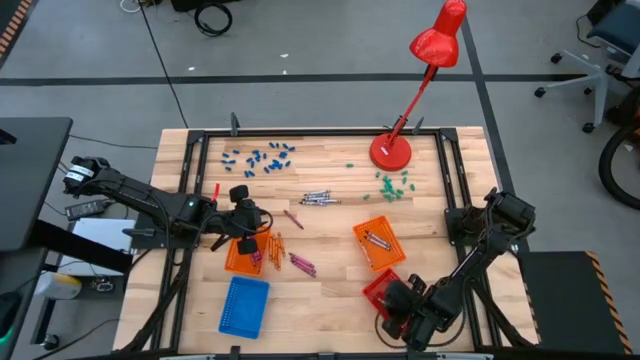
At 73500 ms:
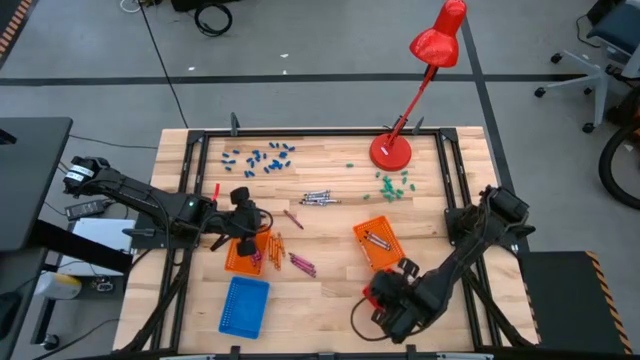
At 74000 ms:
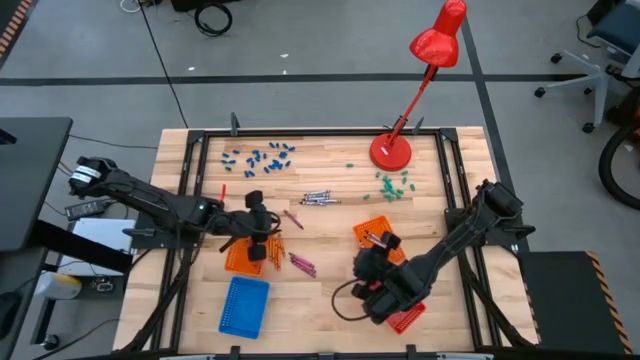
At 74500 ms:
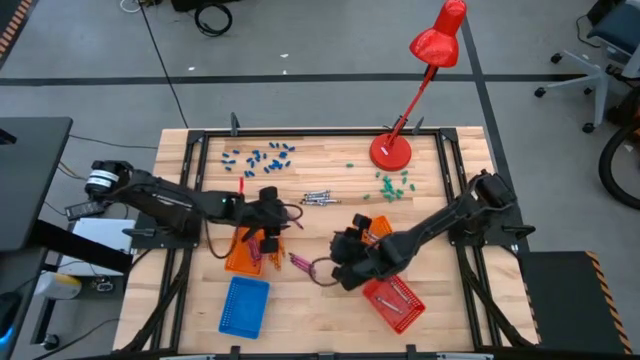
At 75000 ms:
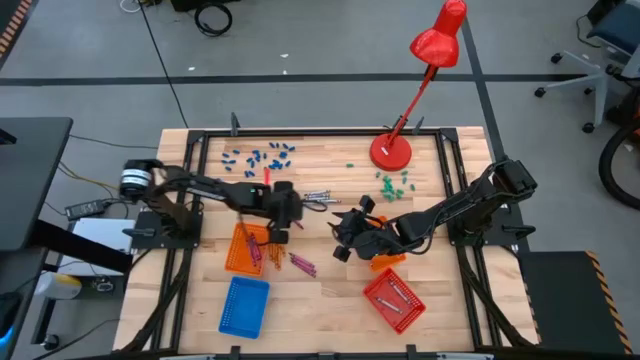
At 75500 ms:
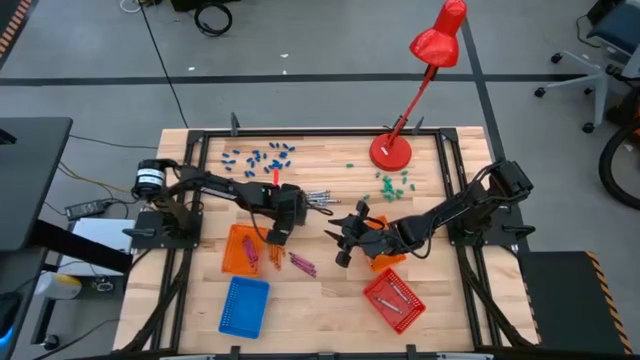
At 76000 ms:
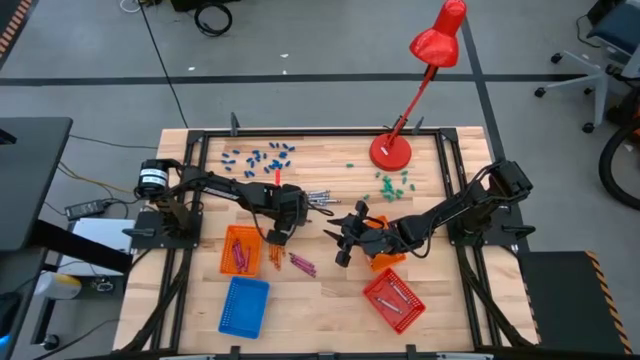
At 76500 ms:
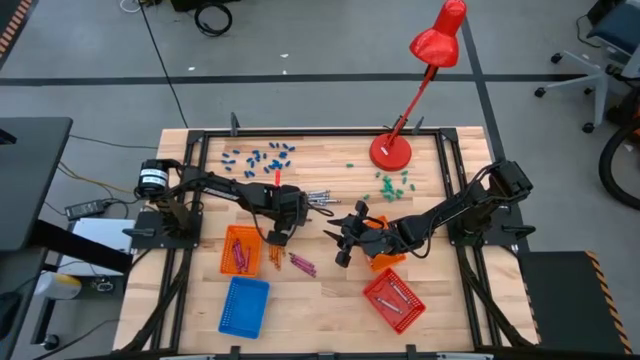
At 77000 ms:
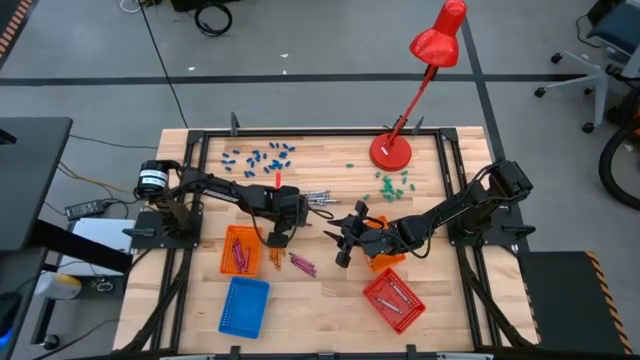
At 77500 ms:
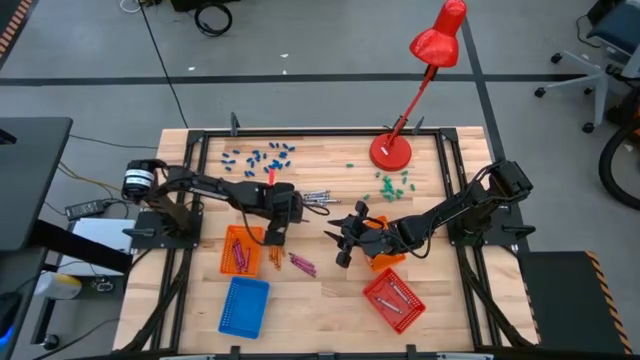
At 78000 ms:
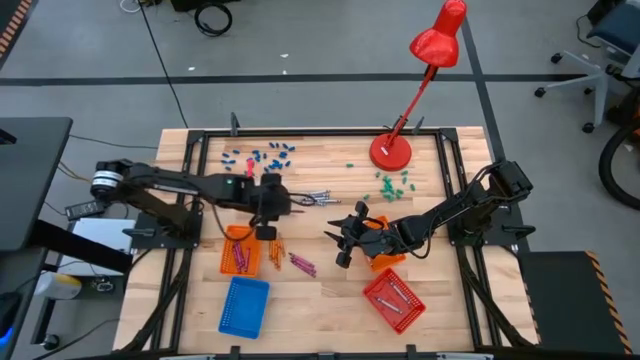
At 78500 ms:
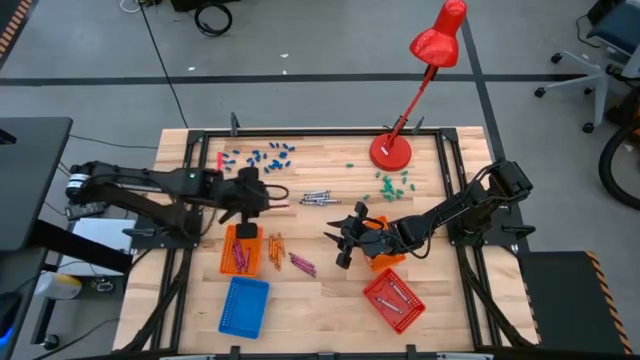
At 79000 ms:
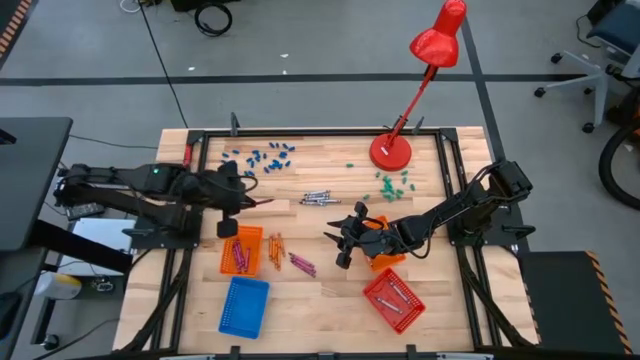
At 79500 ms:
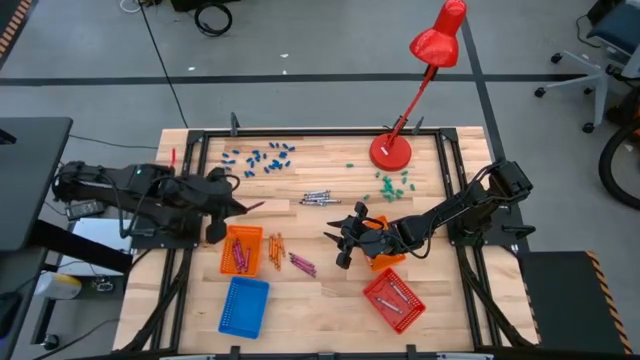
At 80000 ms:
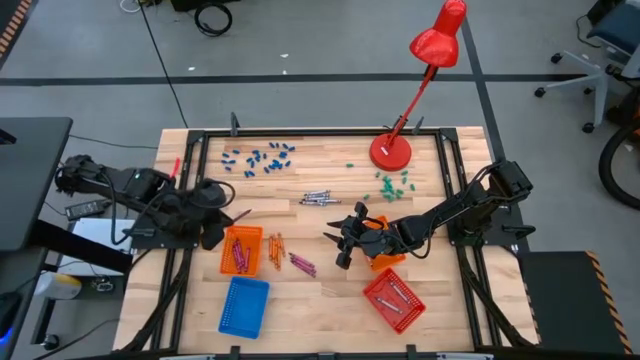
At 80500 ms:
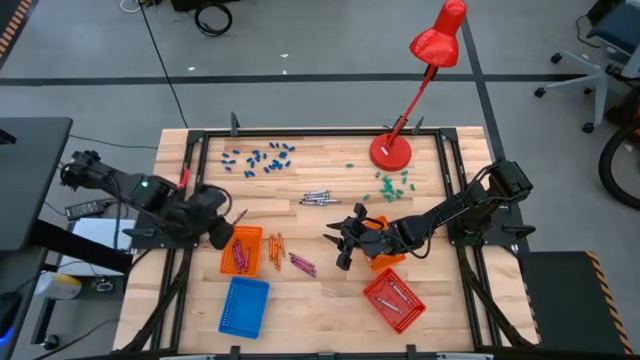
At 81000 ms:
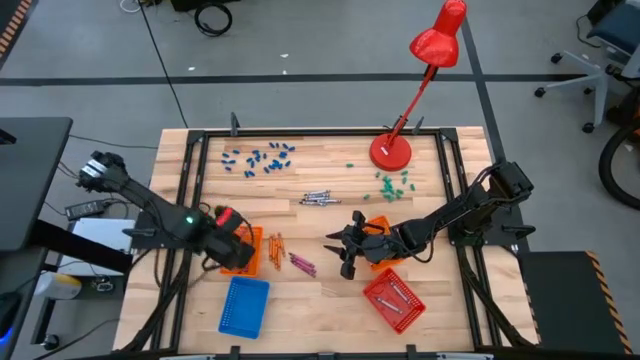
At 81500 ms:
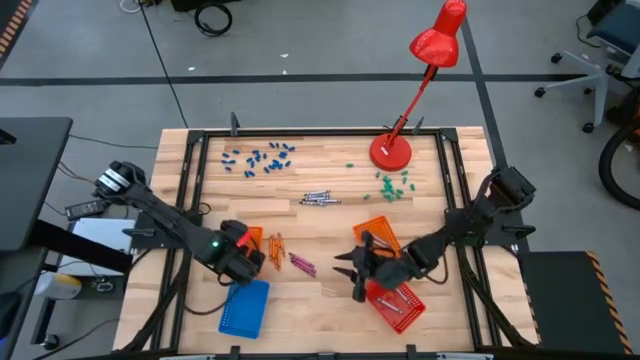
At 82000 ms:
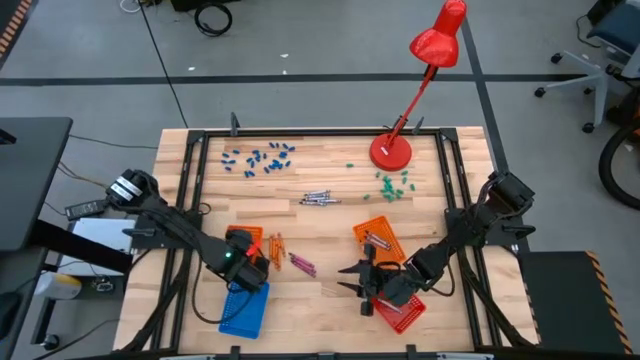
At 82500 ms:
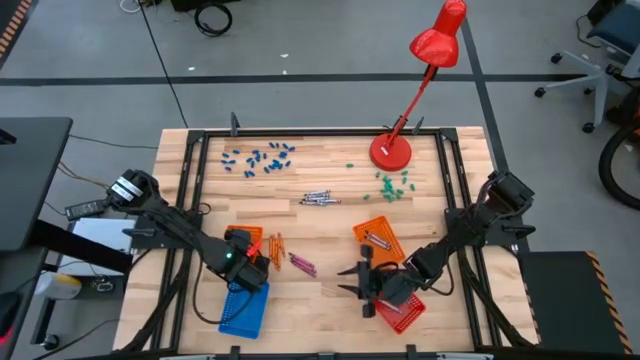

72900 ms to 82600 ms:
Task: Sort crayons
Put the red crayon into the left orange bin

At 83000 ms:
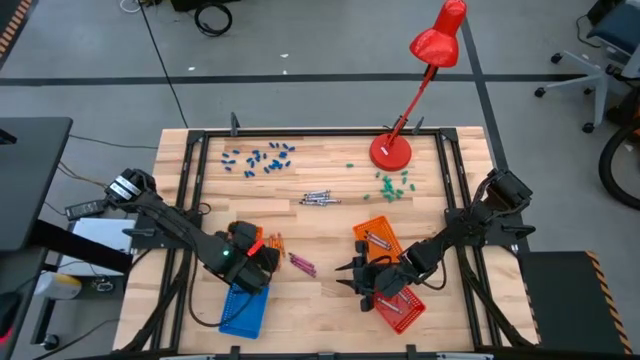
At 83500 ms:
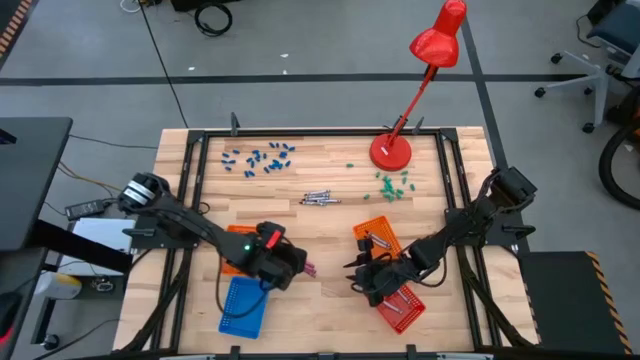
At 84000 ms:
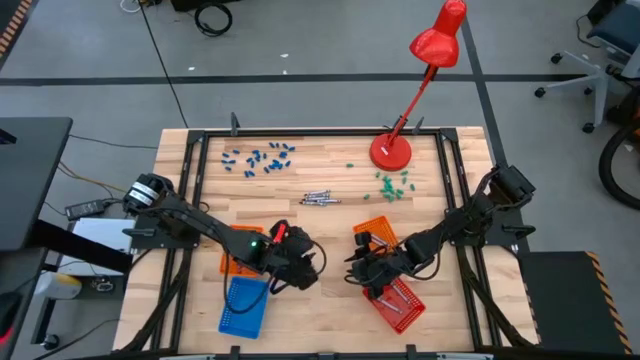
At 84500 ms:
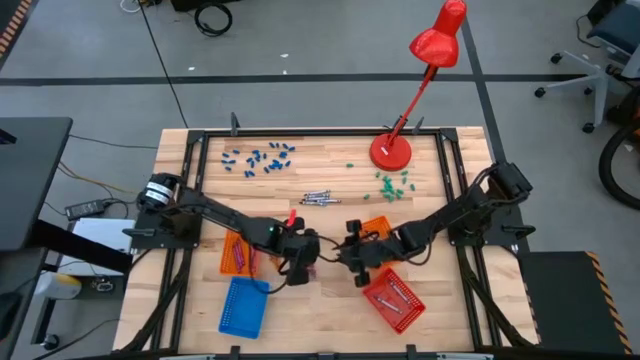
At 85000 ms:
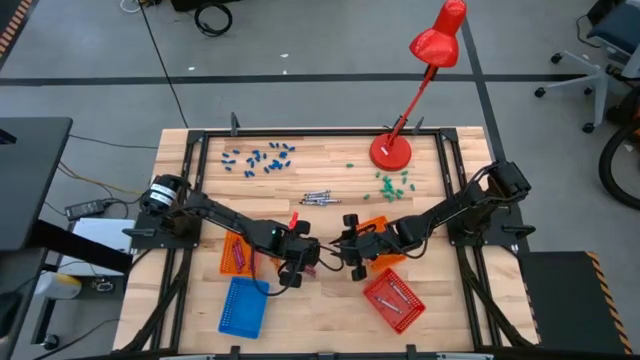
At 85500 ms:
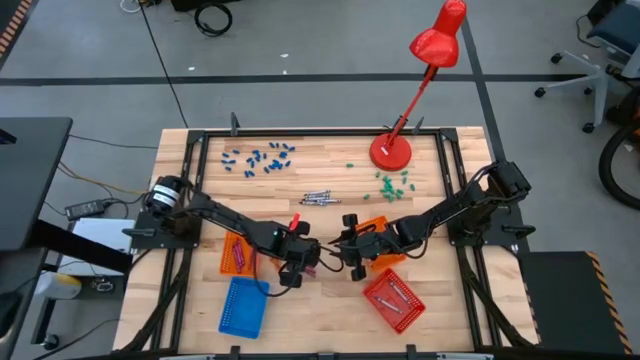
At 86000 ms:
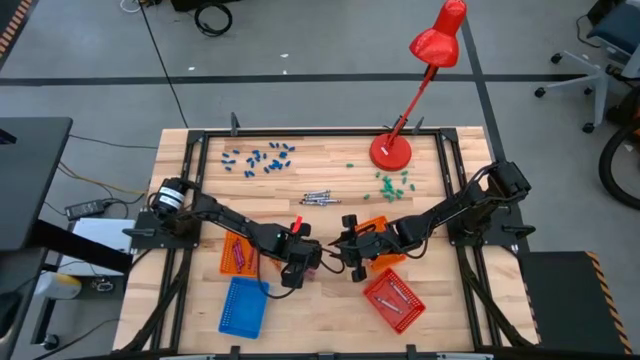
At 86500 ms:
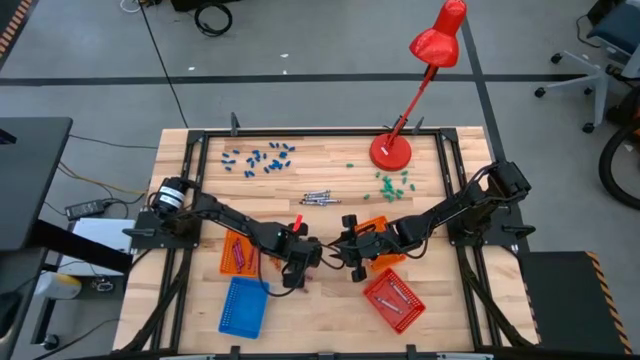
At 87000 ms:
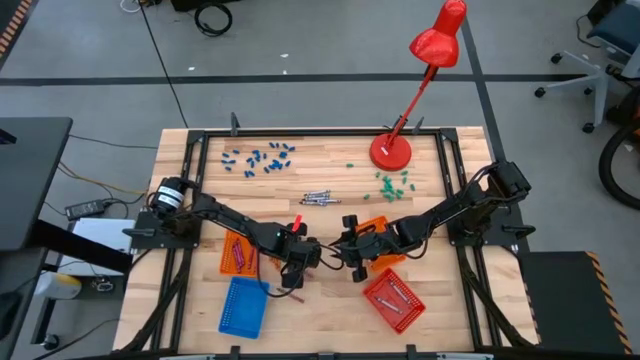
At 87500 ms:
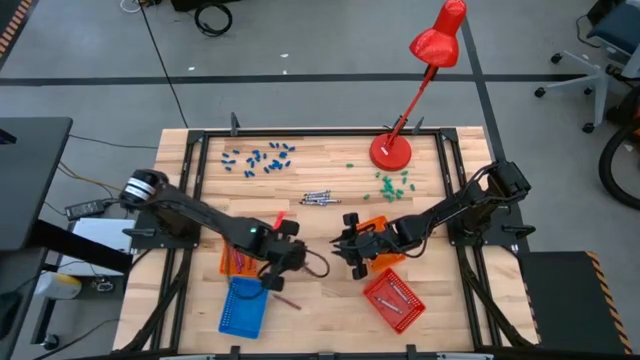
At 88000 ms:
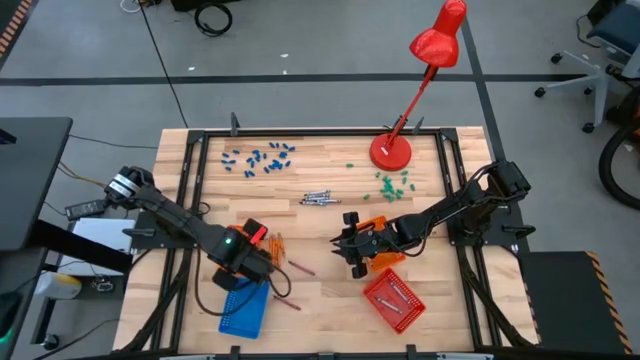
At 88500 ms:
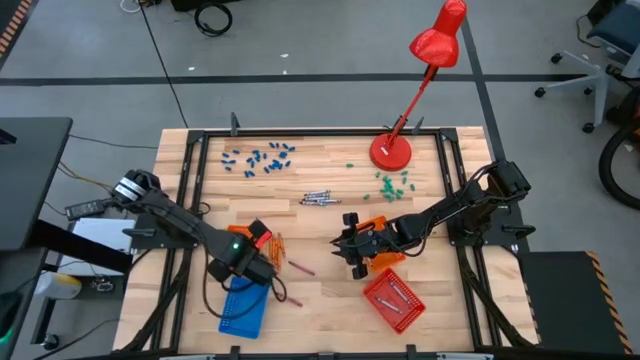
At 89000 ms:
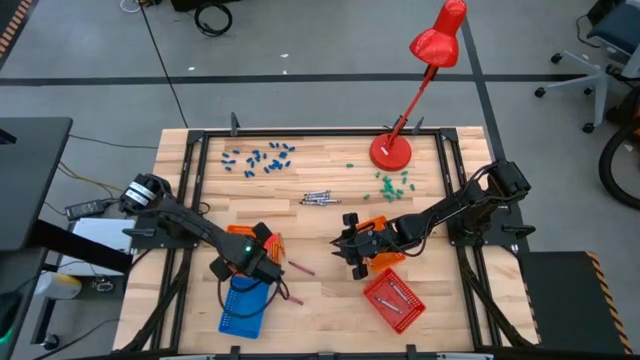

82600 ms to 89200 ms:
Put the red crayon into the left orange bin

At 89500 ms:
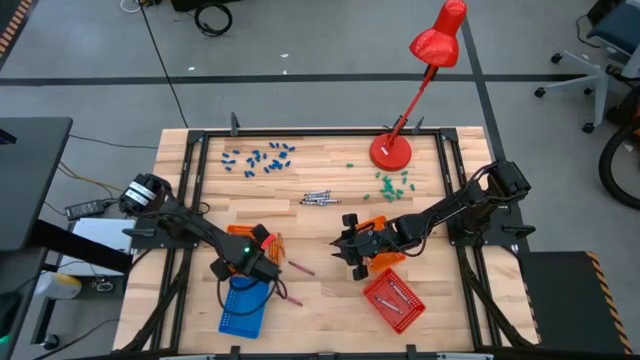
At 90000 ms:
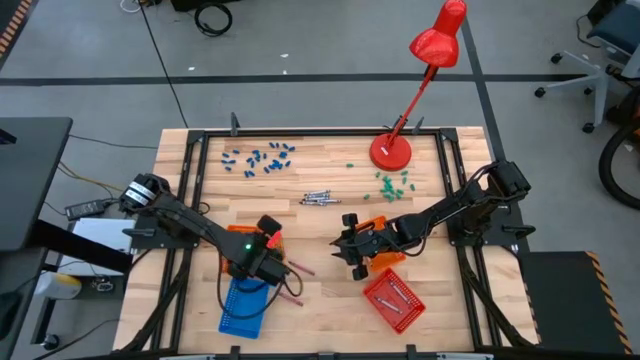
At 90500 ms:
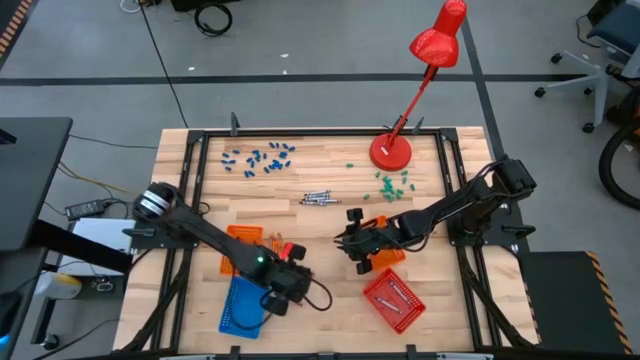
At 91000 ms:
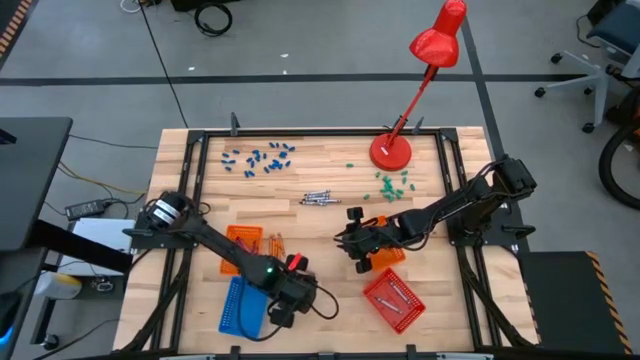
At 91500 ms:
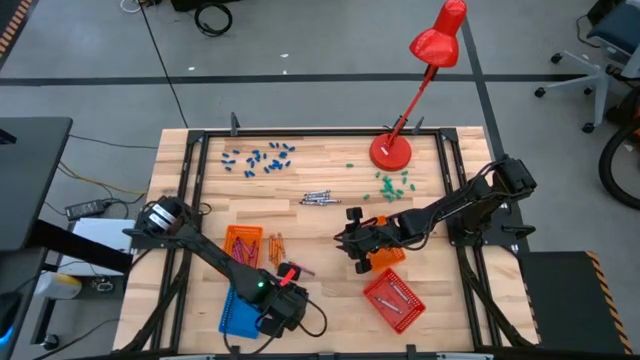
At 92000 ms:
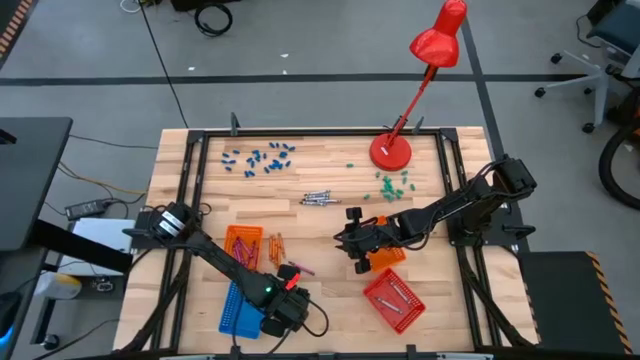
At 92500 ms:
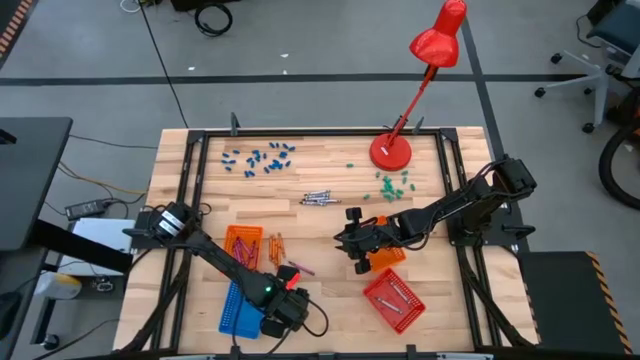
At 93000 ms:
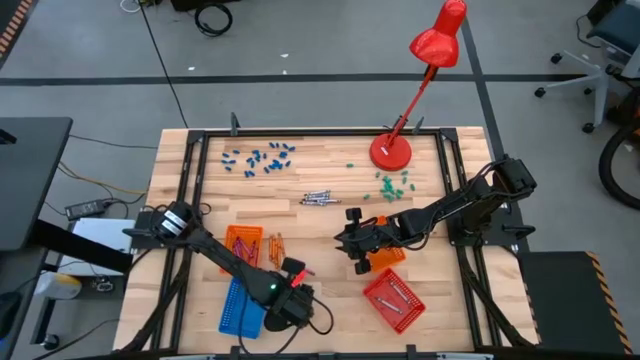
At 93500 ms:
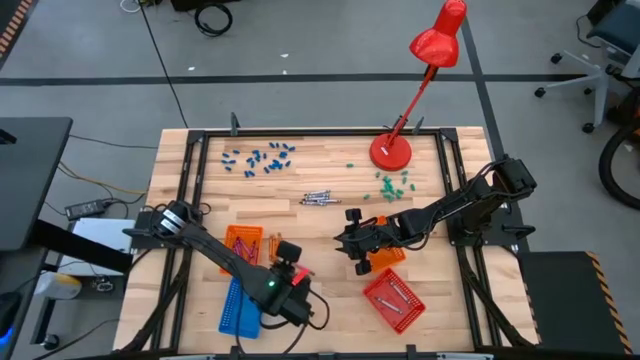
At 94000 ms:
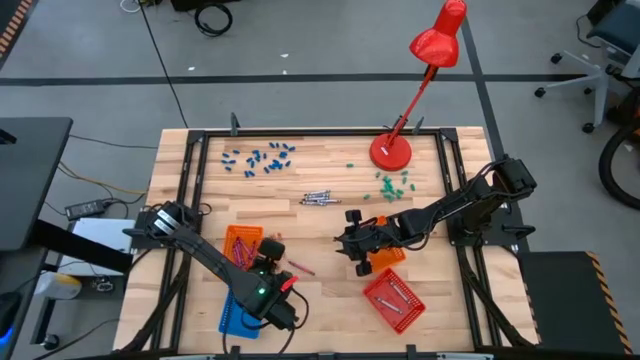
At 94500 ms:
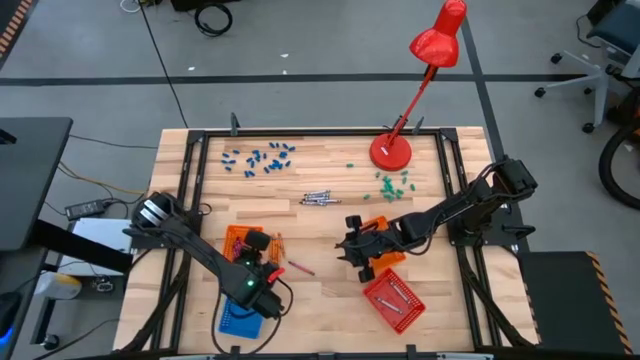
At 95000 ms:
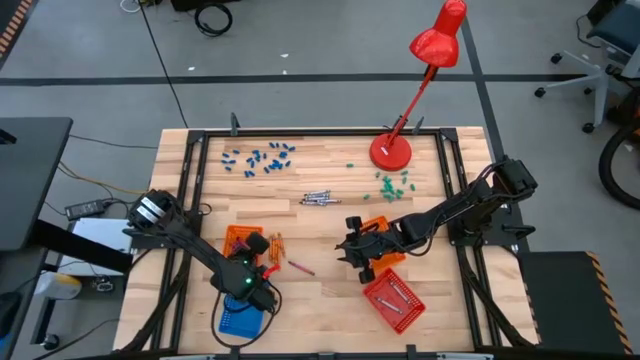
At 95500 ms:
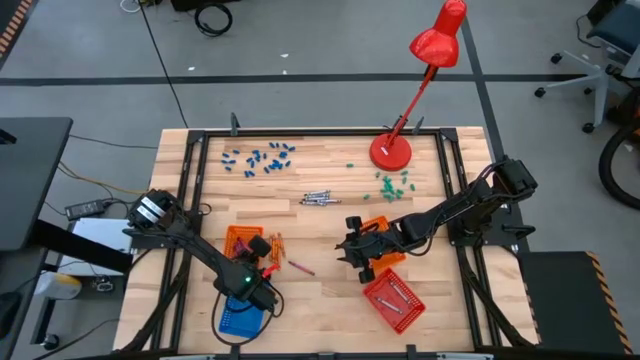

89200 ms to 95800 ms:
Put the red crayon into the left orange bin
